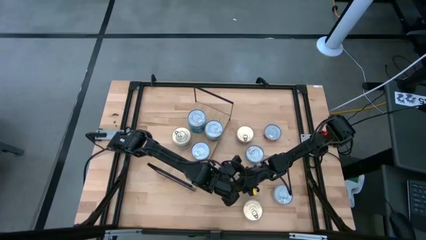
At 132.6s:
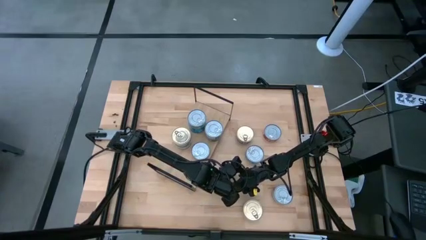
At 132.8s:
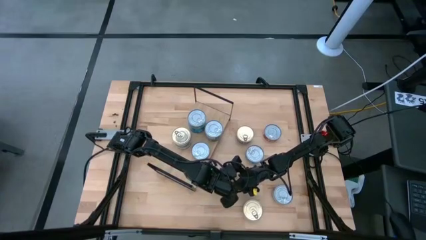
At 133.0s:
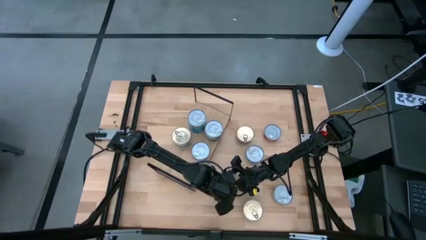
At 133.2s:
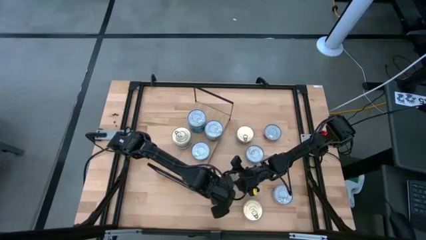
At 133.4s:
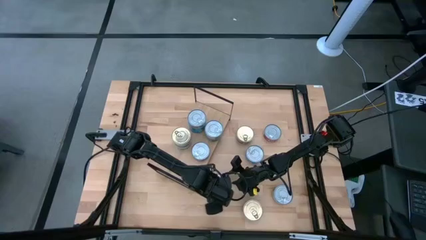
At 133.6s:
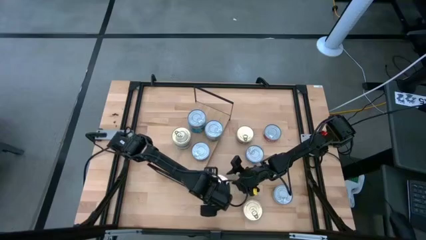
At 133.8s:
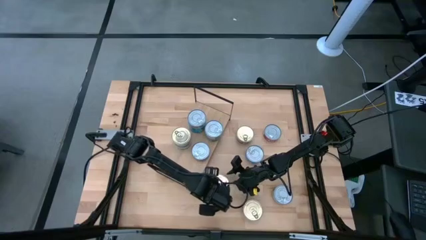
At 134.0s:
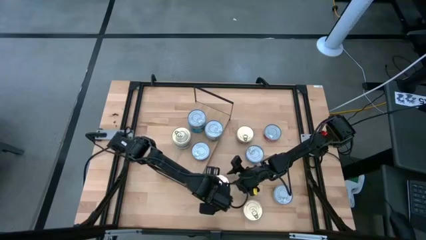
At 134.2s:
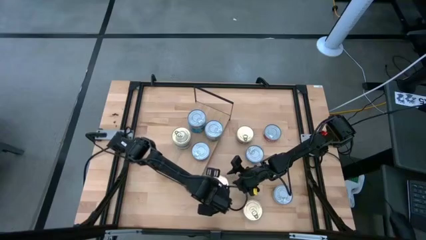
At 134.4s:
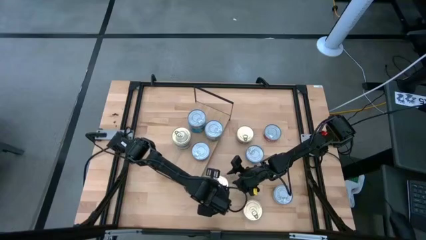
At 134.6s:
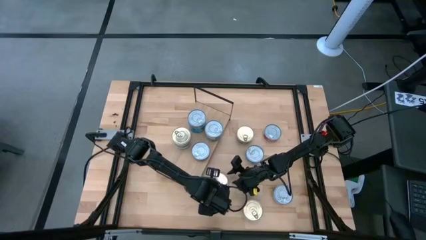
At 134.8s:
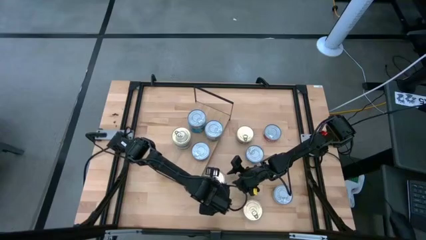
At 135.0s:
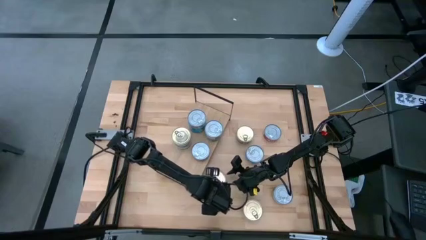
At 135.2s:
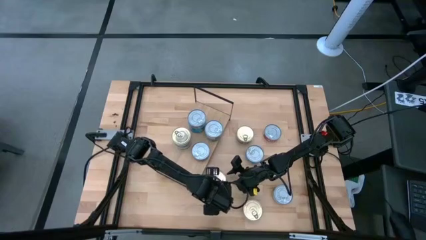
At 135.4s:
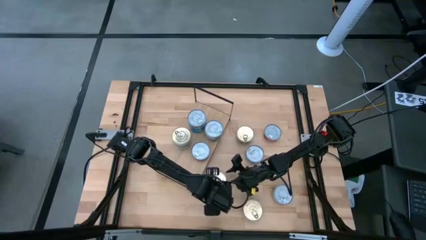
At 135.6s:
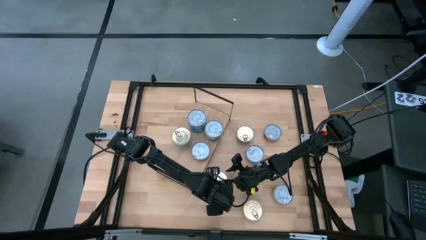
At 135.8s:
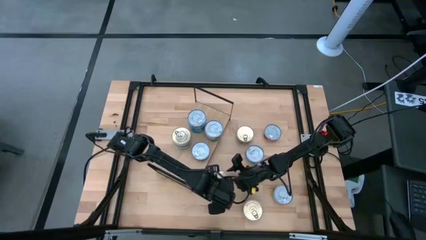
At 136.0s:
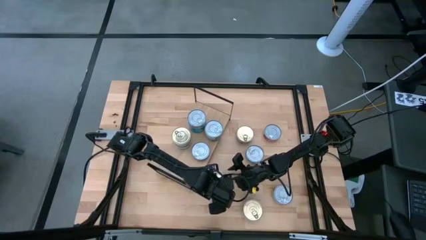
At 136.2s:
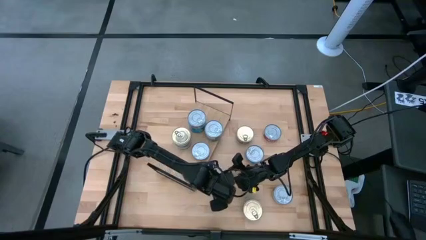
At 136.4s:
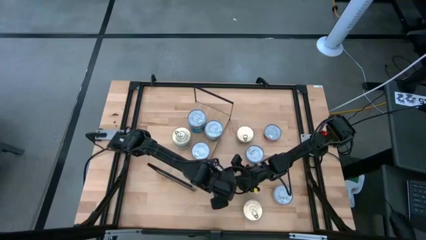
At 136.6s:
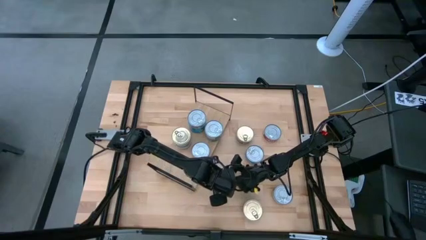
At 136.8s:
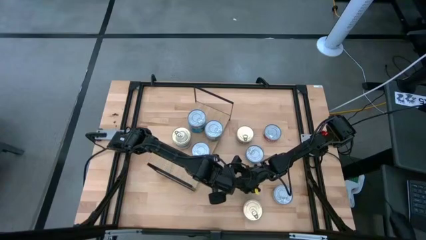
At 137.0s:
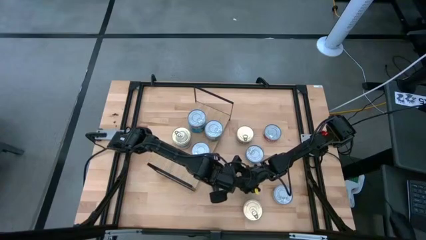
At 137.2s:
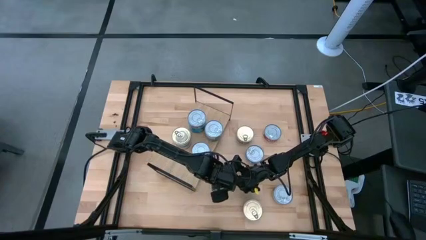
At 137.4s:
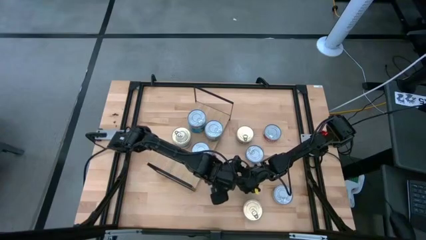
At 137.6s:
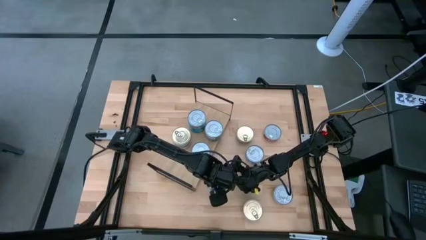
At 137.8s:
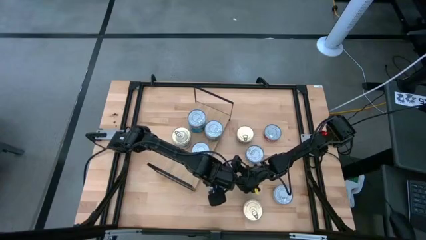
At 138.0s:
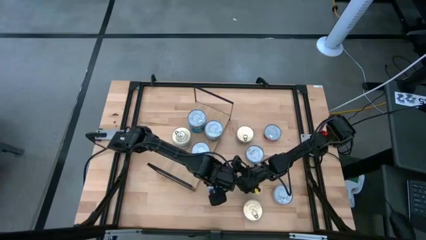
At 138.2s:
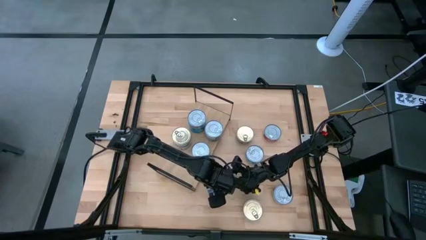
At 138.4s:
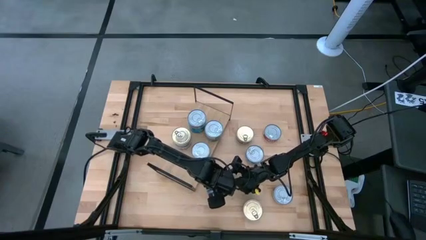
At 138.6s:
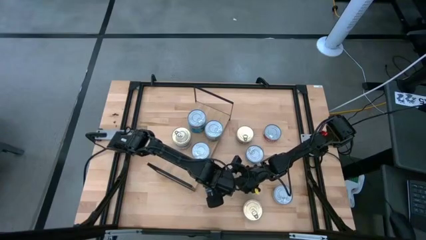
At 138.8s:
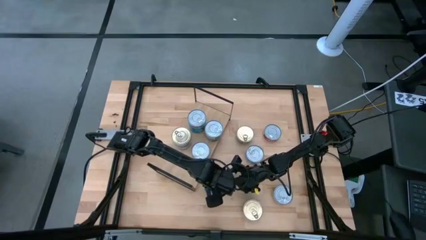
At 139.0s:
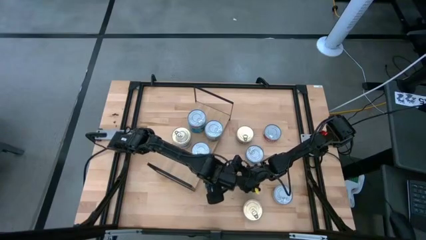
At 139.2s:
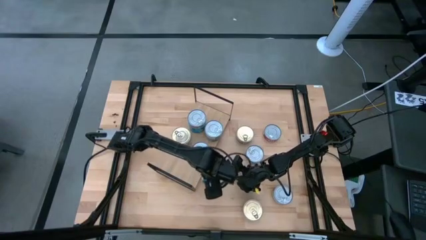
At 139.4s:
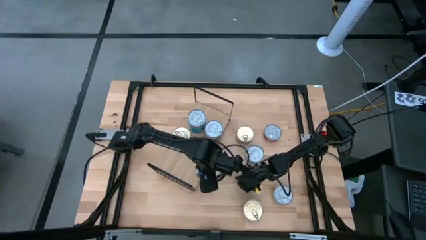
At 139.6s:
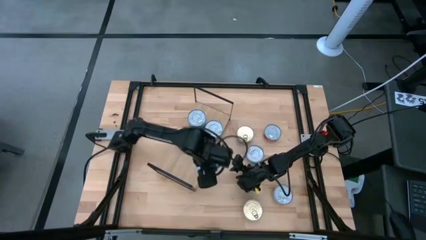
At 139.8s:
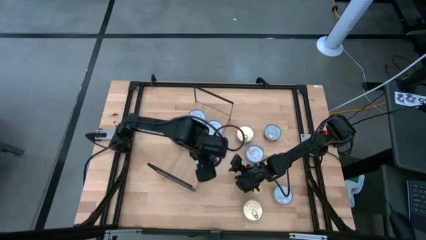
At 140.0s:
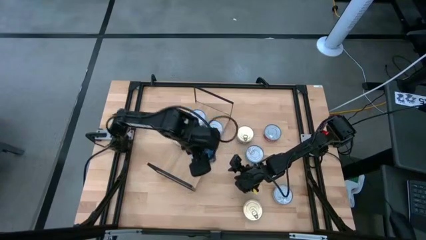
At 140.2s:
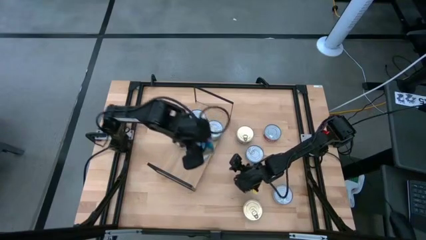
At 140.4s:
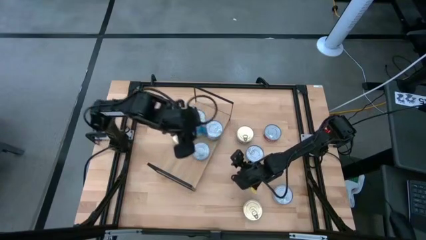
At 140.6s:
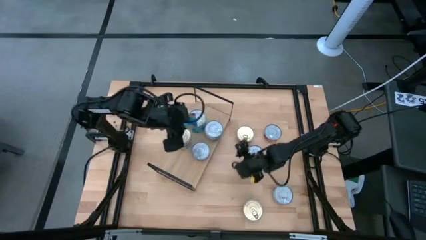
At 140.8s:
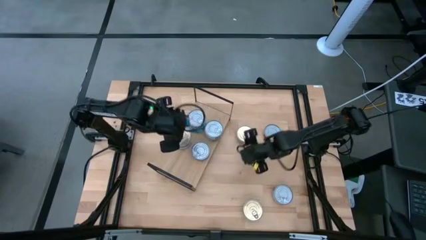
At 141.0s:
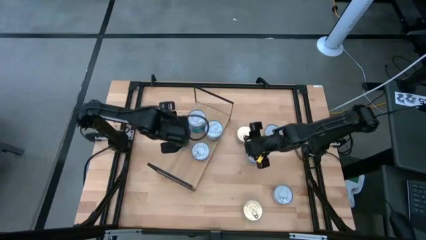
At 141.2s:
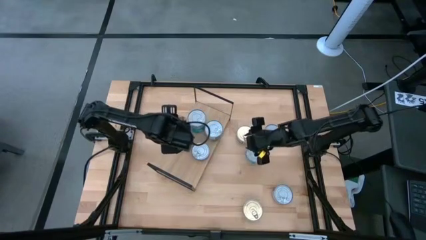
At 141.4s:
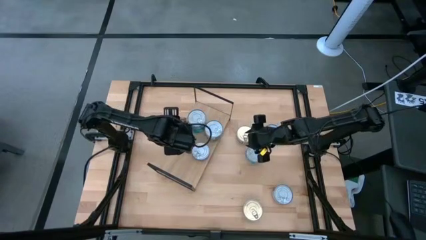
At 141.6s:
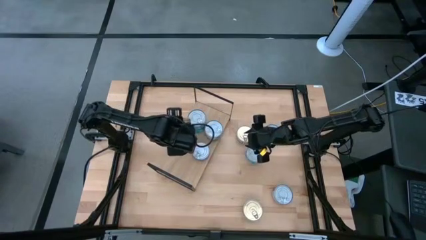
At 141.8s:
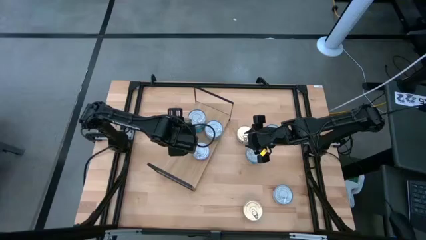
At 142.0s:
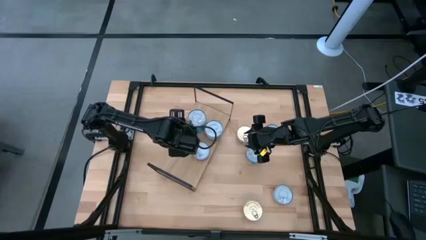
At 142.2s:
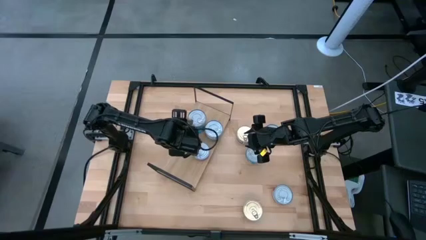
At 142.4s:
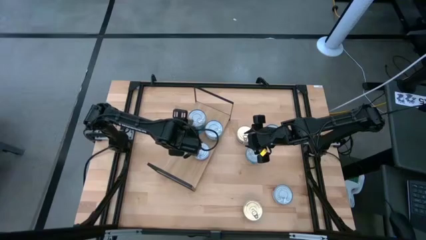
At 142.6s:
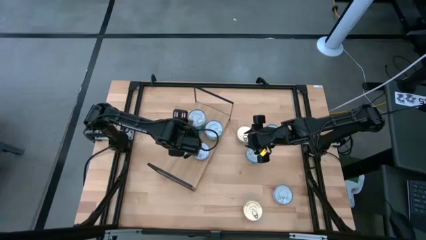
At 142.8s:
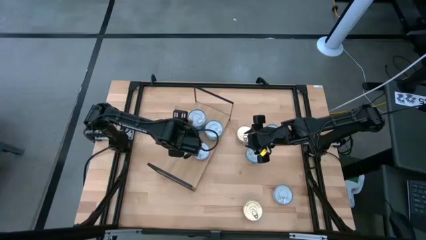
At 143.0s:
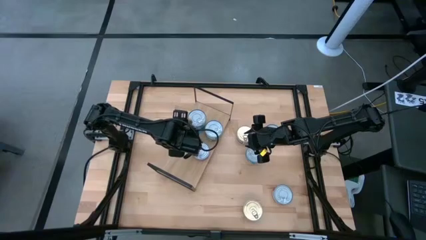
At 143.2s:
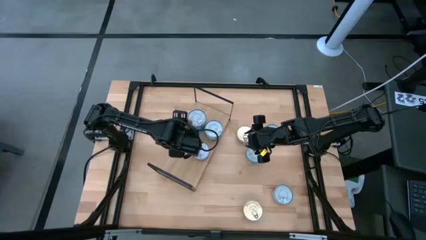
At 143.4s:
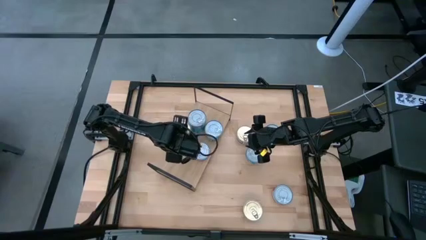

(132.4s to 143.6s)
Task: Stack canned seafood by type on shelf
Stack the blue tuna can on top of the blue tuna can on the shelf

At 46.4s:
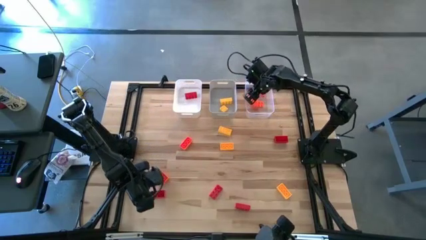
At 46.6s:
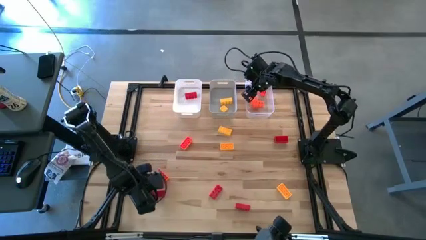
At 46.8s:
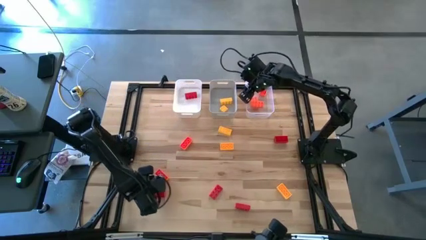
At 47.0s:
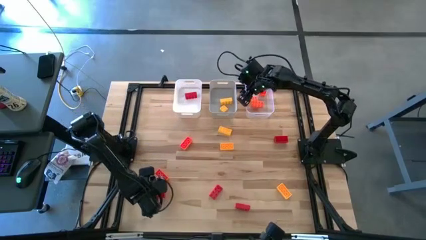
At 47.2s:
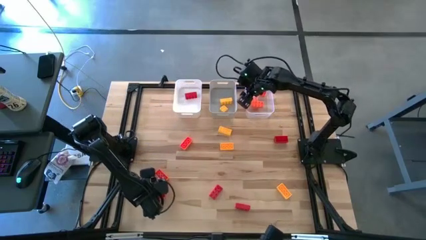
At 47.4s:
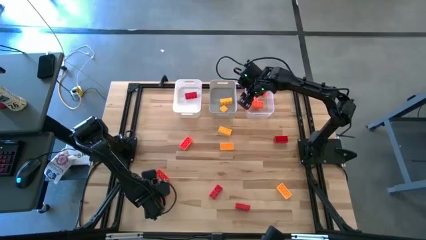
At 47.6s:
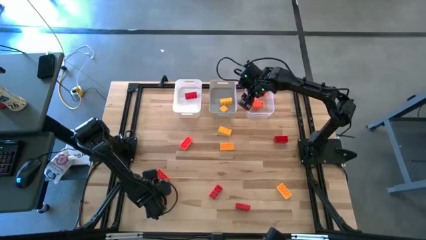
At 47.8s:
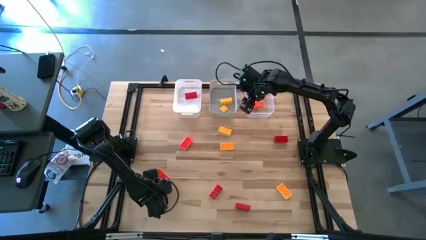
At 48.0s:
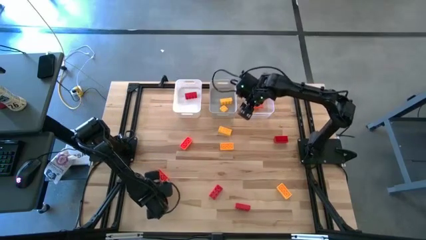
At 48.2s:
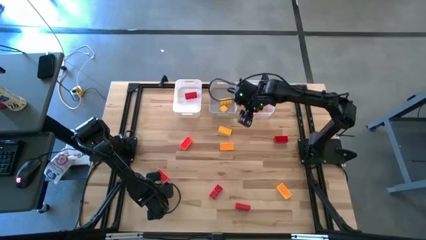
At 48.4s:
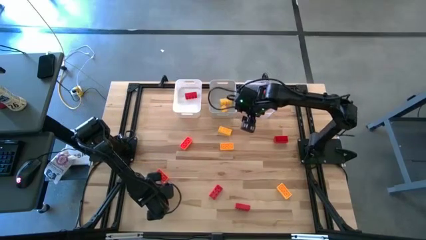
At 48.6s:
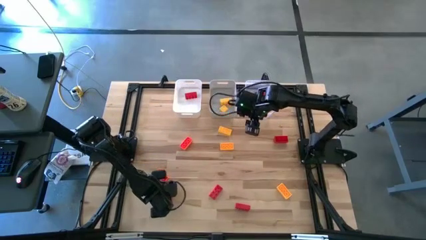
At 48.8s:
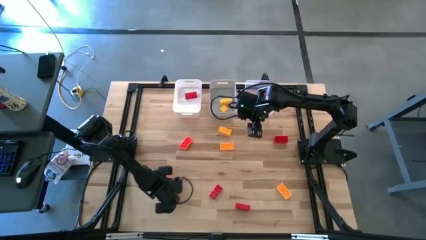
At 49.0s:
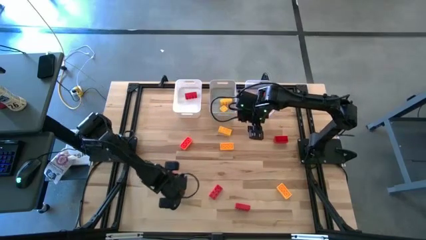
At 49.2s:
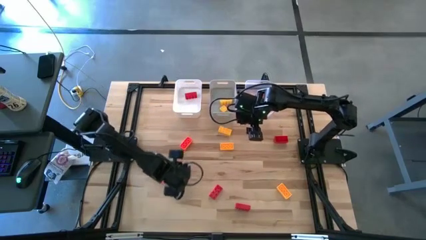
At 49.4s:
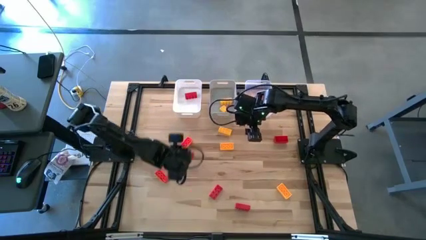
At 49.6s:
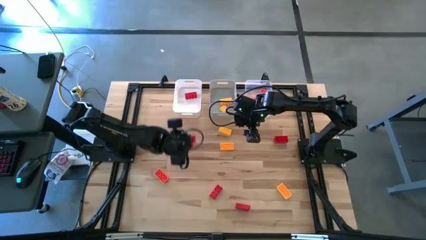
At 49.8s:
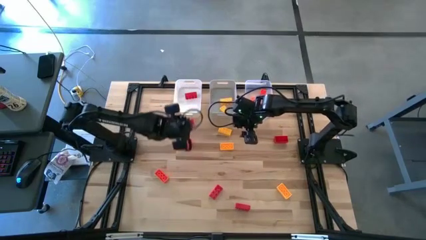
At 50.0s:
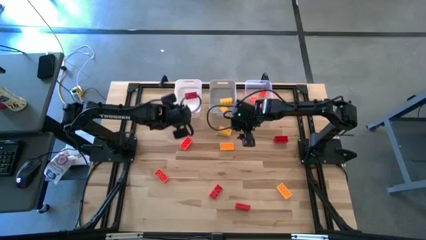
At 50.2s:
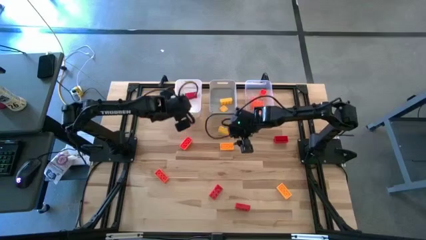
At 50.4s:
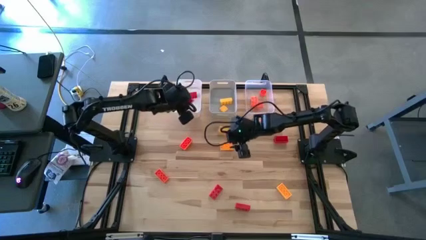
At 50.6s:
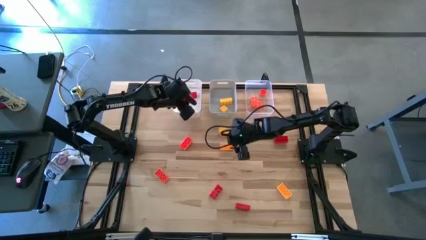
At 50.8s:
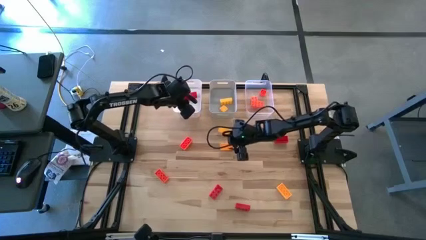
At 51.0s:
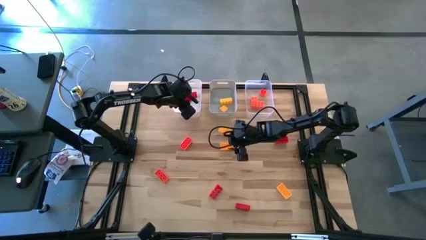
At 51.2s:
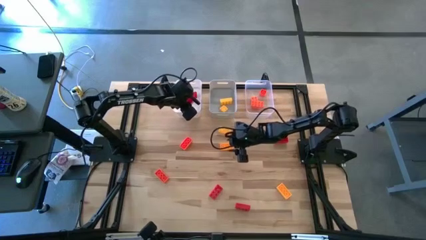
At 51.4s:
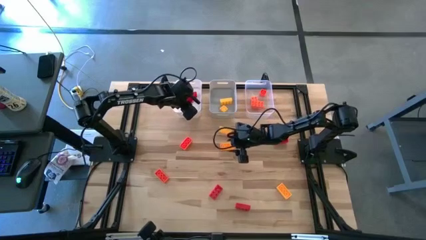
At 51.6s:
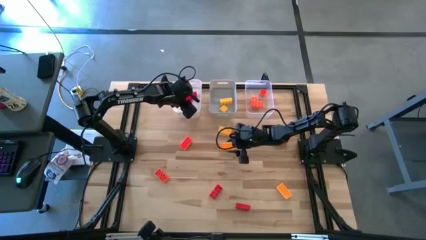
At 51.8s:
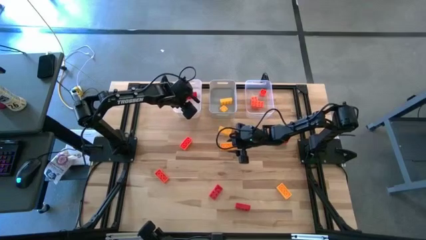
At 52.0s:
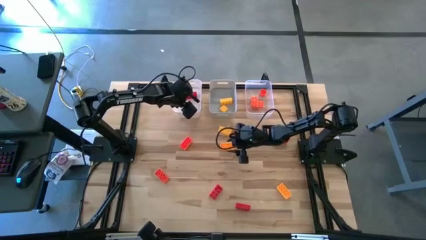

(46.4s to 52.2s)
Task: Sort & place blocks by color
Put the red game piece into the white bin
